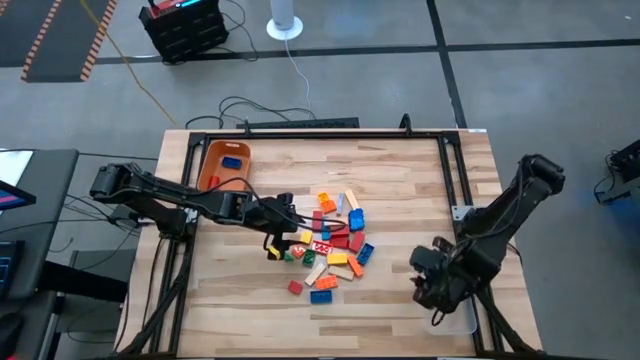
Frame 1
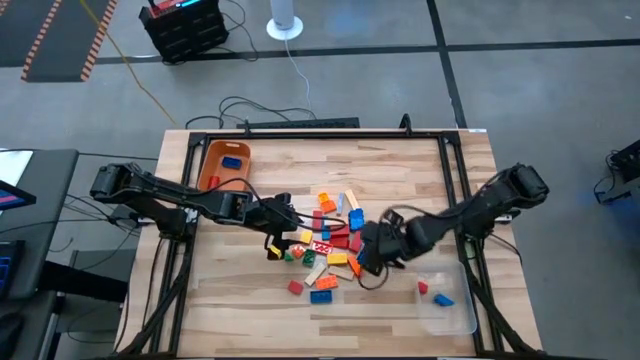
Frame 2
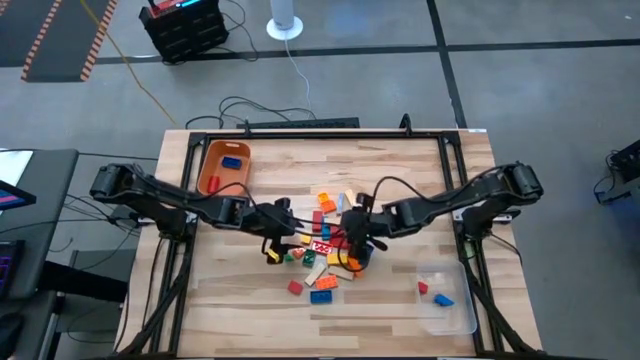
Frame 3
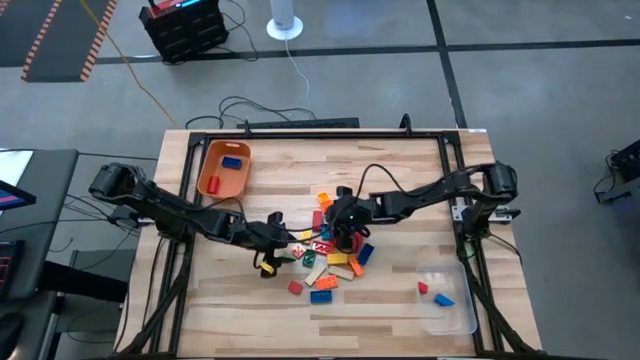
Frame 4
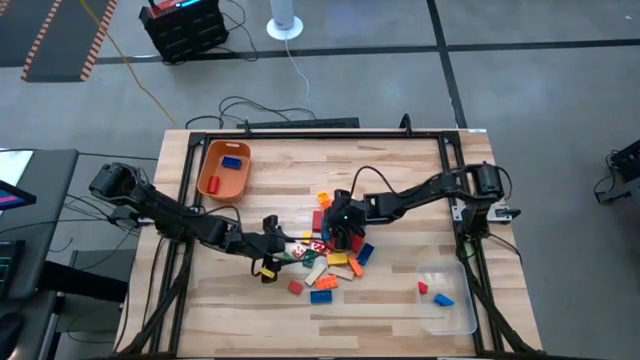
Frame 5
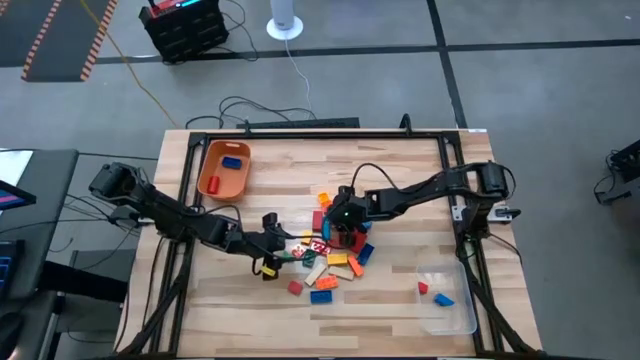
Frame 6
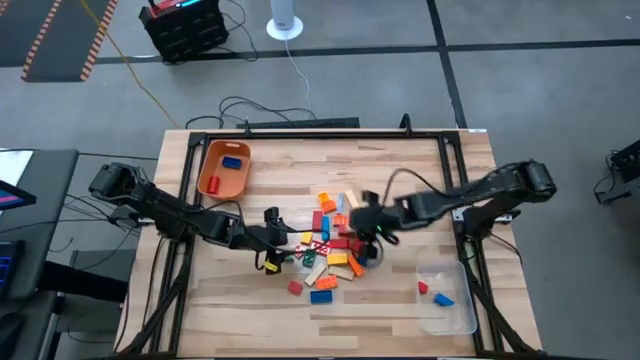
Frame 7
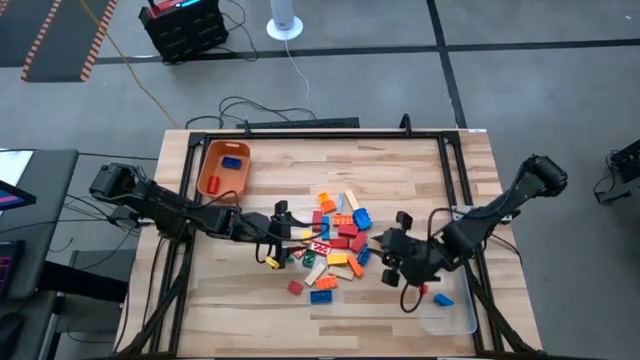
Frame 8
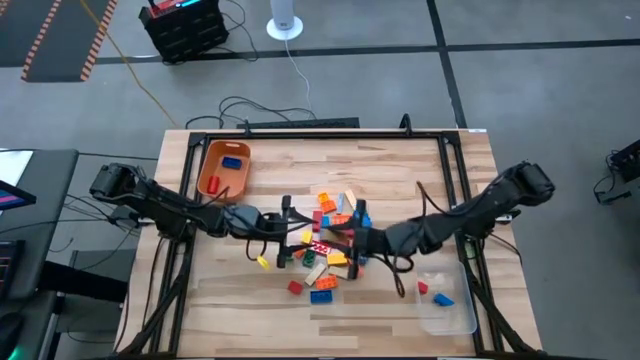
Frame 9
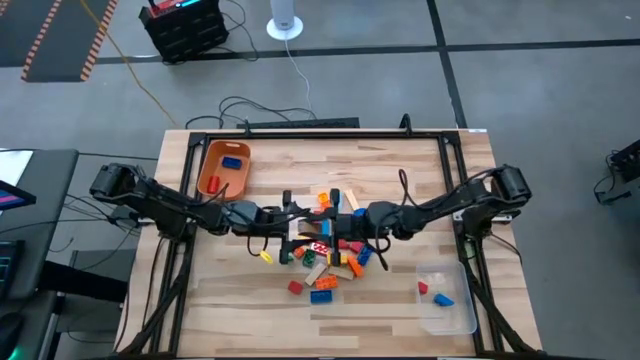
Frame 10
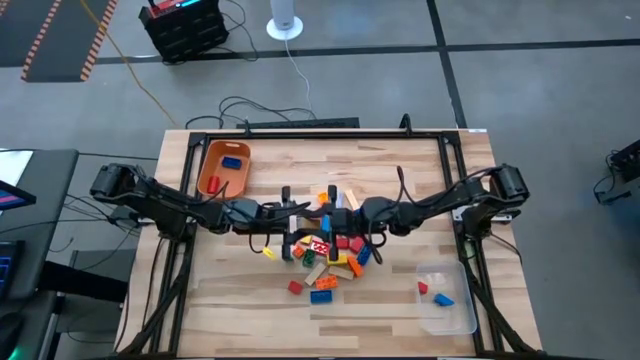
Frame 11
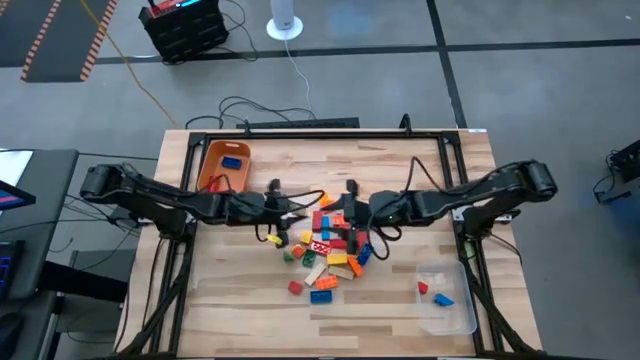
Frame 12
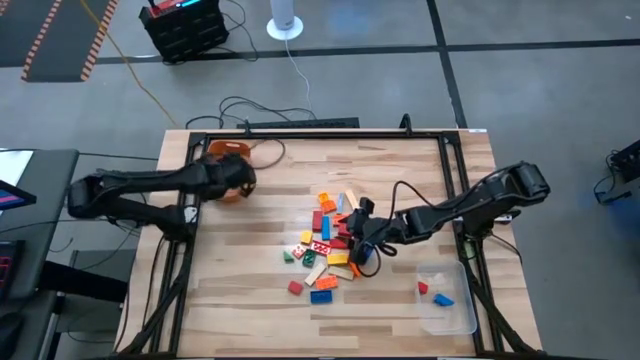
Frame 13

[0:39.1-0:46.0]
Task: Sort blocks by size
Put the large brown wooden block into the orange bin

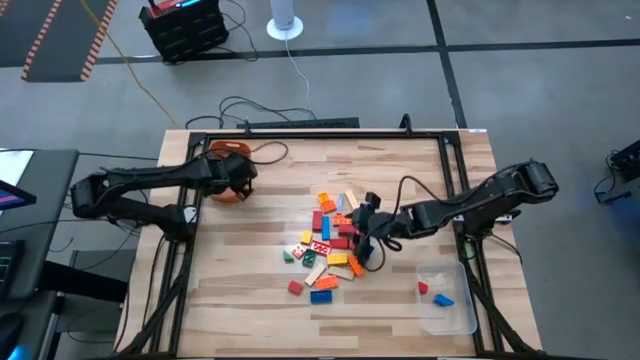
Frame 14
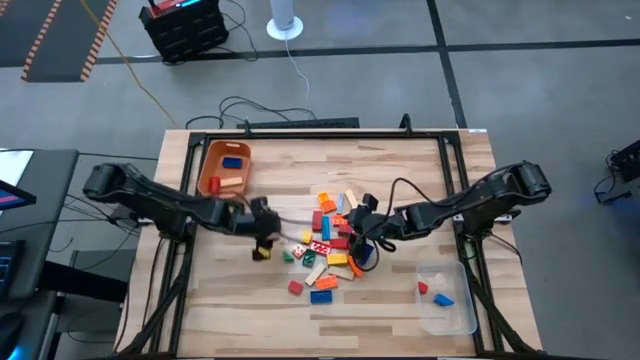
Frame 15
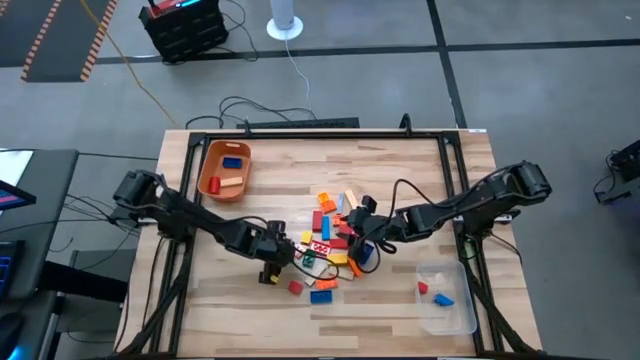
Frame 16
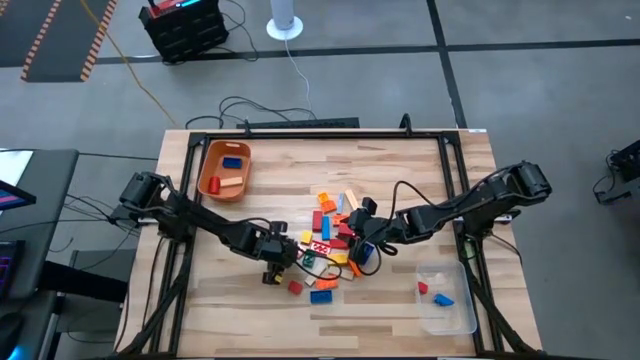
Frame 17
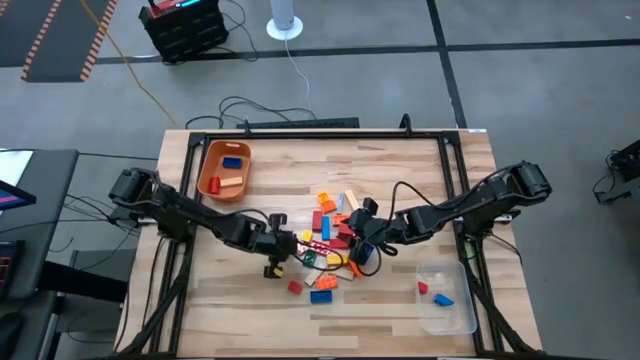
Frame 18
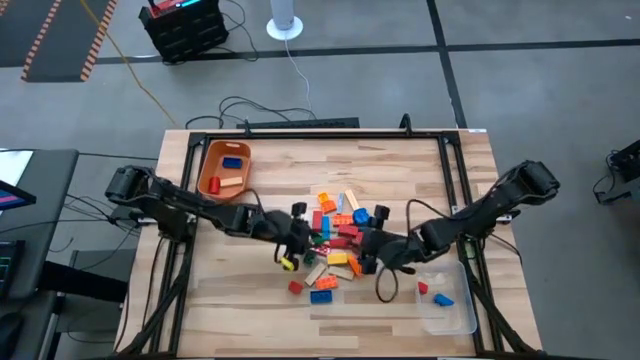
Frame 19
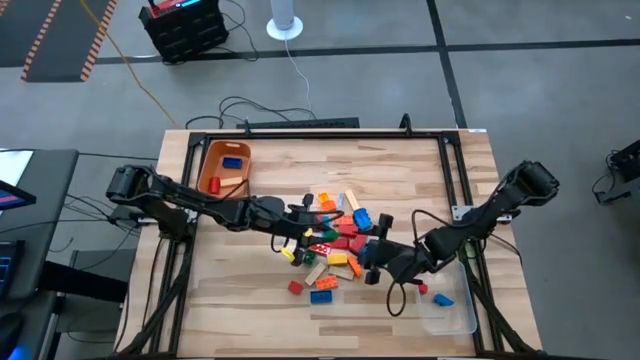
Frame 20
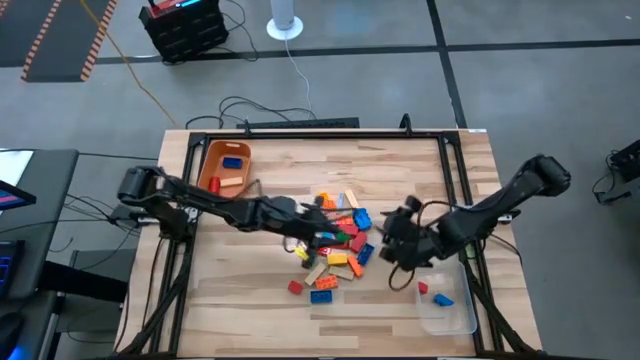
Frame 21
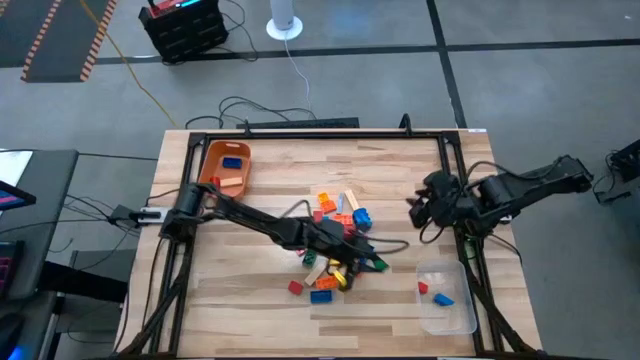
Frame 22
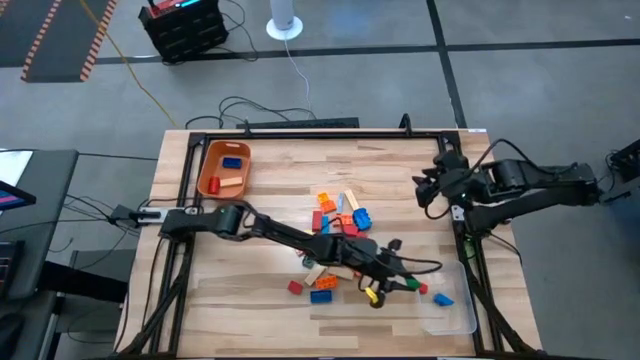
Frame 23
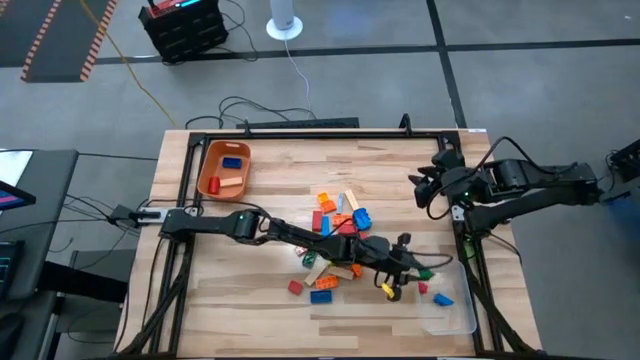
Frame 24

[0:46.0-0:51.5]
Put the small green wooden block into the transparent bin

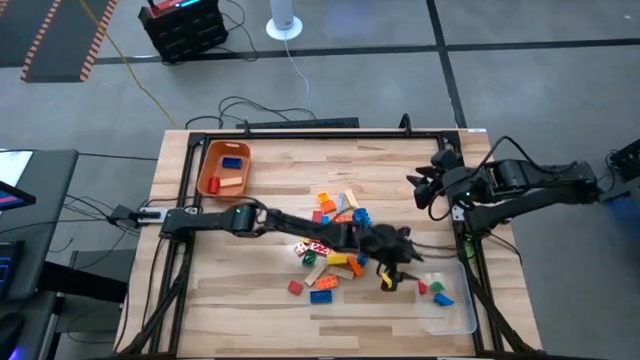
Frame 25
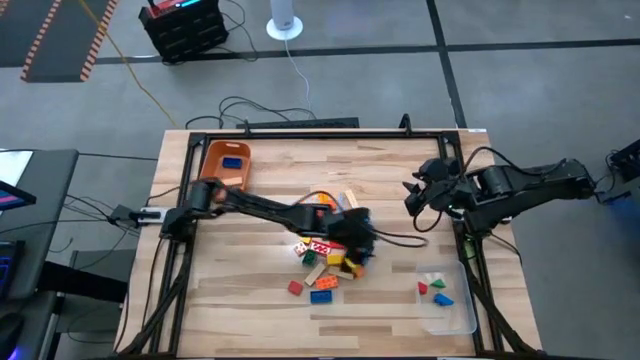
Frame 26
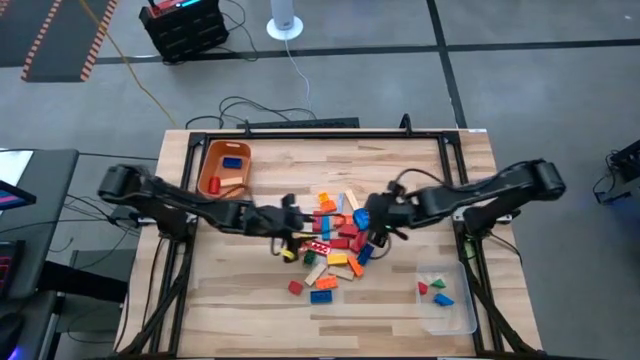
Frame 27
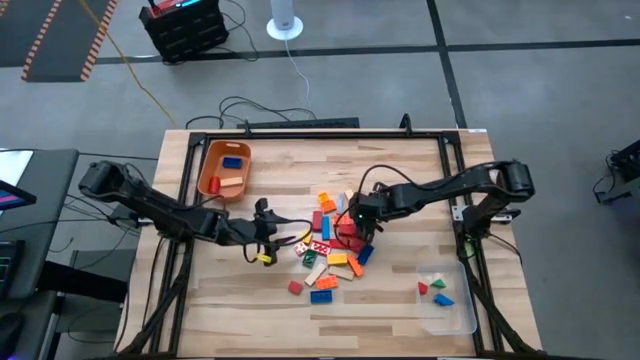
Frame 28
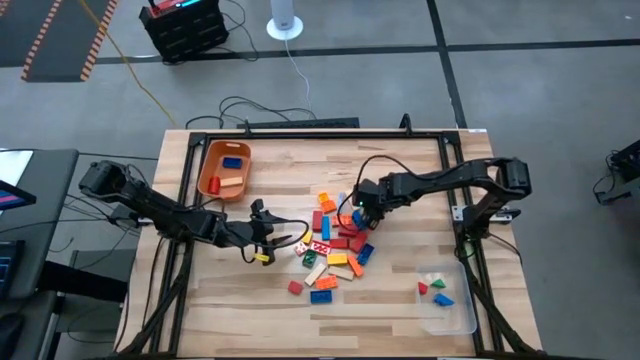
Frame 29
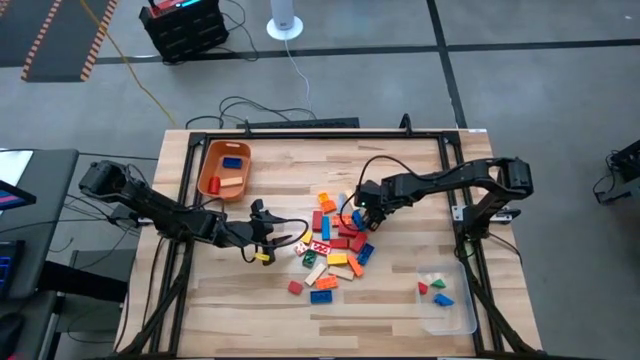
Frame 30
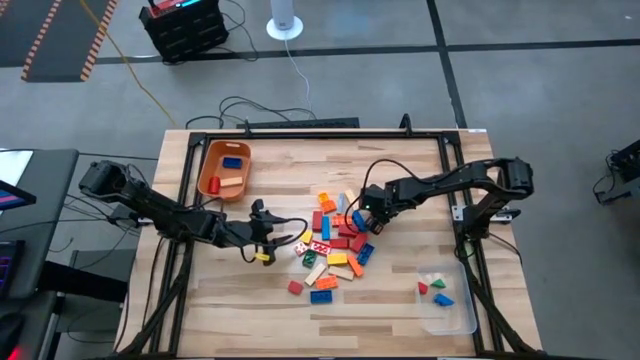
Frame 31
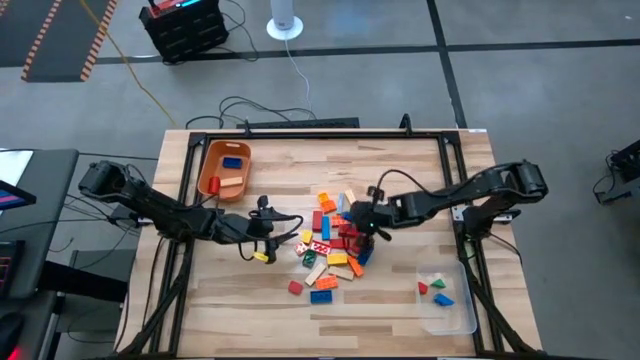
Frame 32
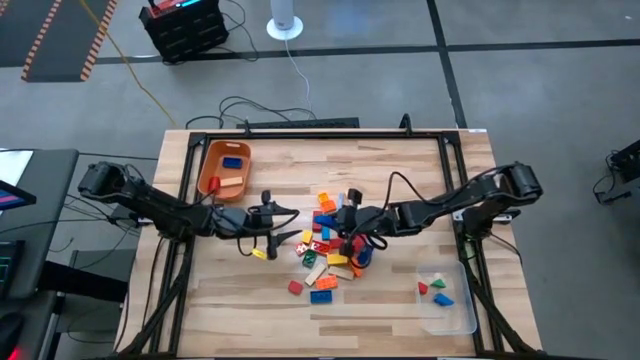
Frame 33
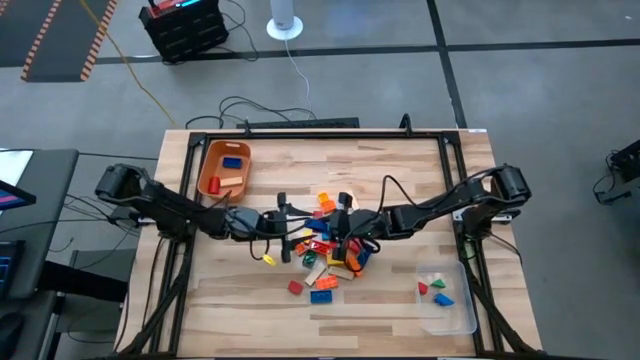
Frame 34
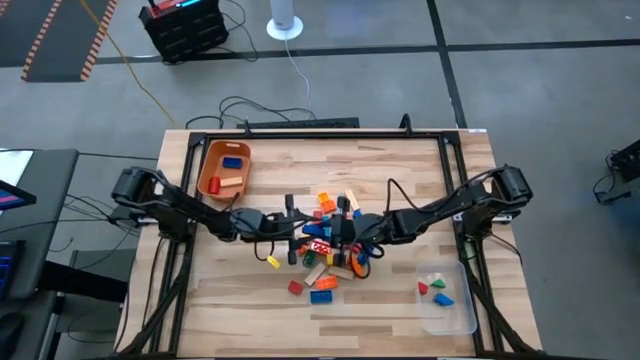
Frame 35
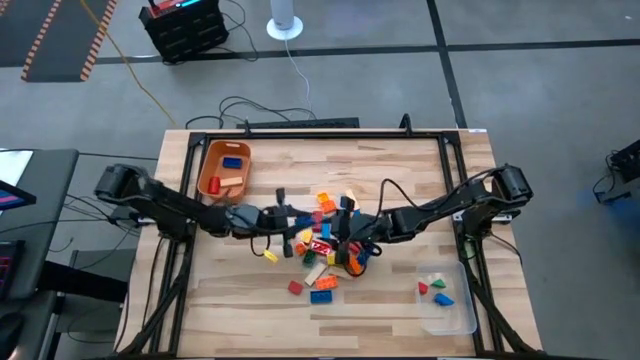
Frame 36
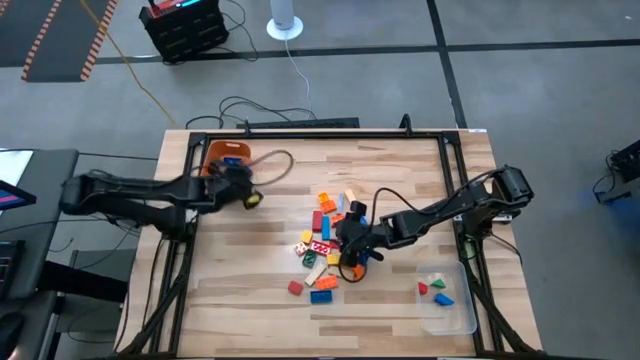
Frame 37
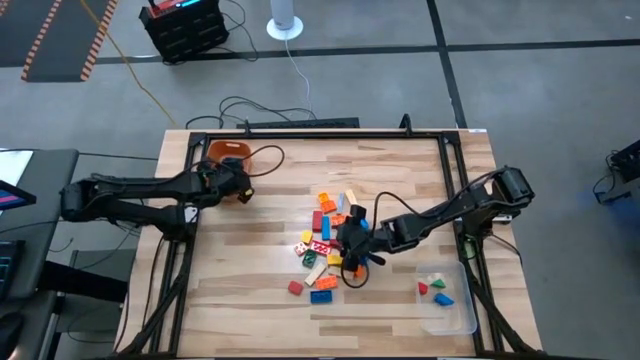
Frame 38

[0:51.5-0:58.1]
Put the large blue game piece into the orange bin

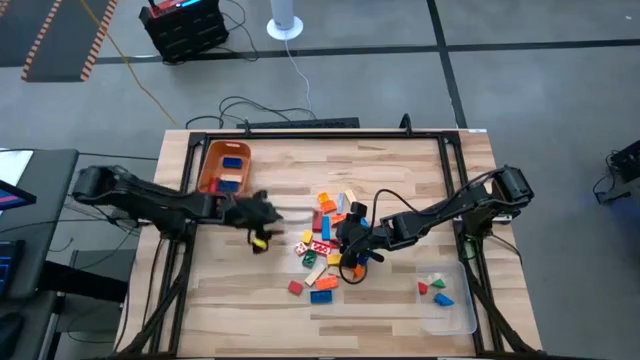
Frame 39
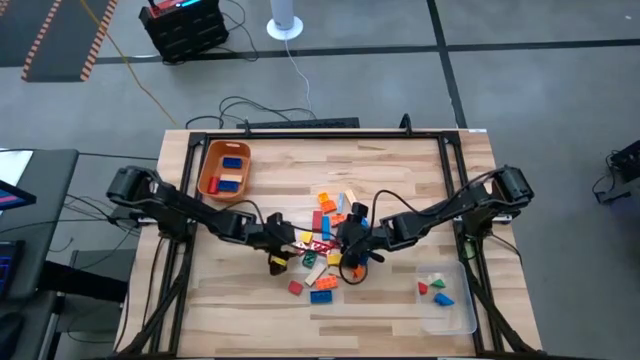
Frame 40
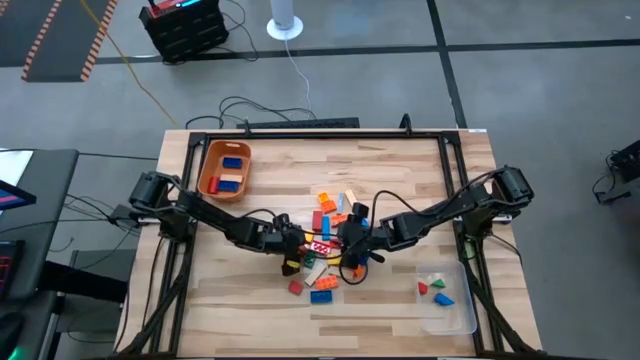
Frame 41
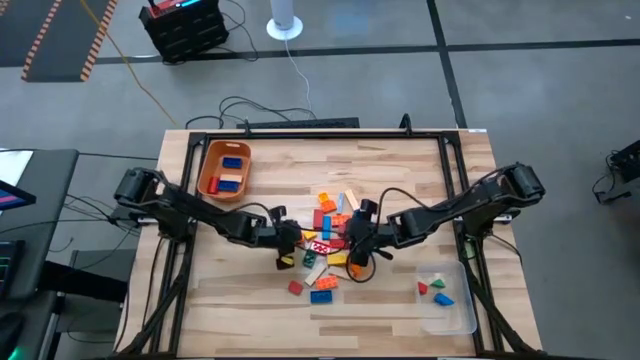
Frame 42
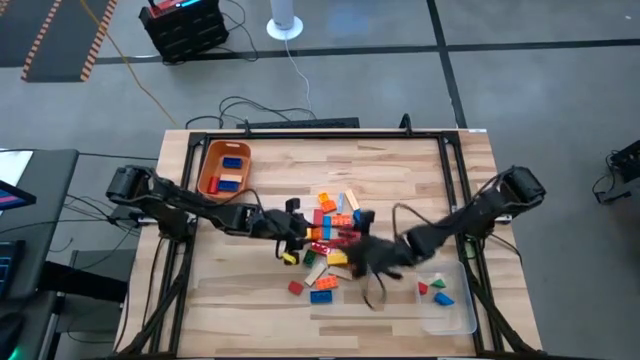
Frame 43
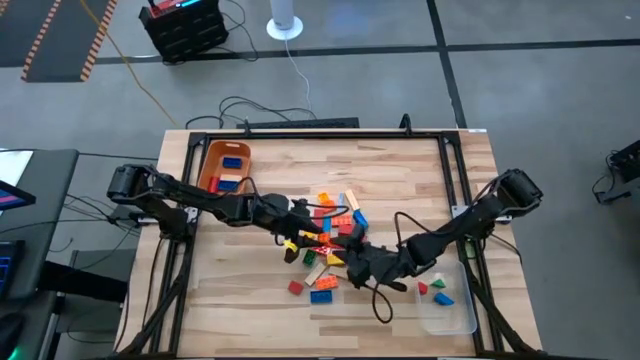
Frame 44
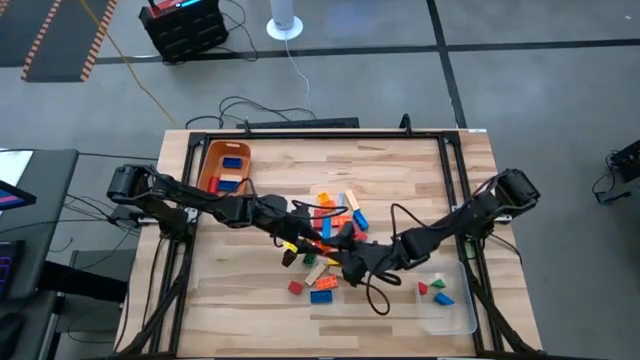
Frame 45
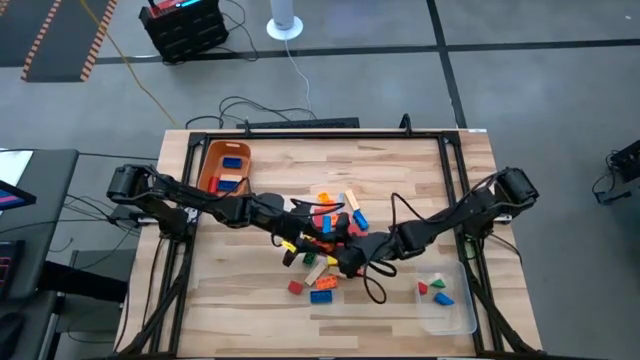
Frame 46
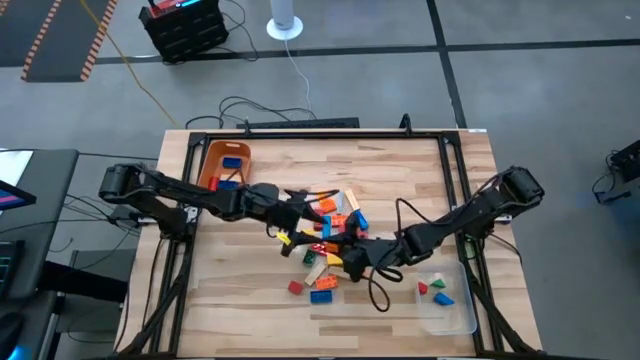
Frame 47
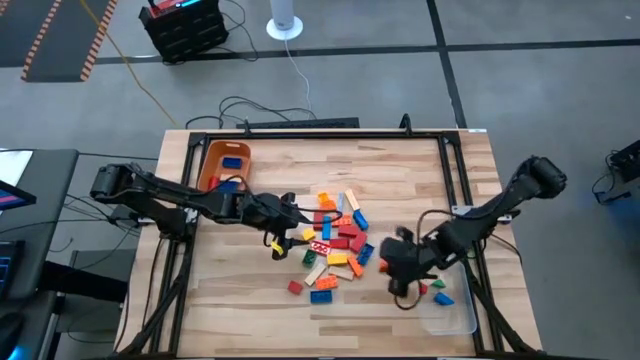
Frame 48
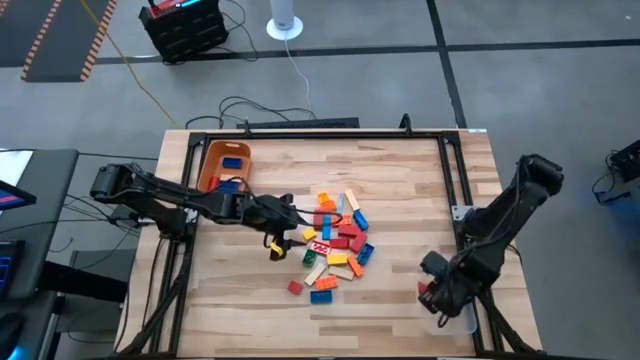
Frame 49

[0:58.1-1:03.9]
Put the small orange game piece into the transparent bin
